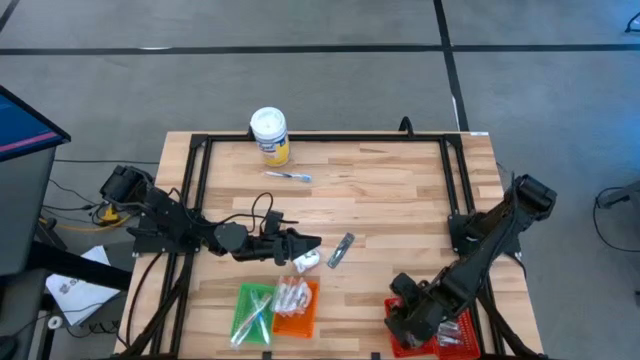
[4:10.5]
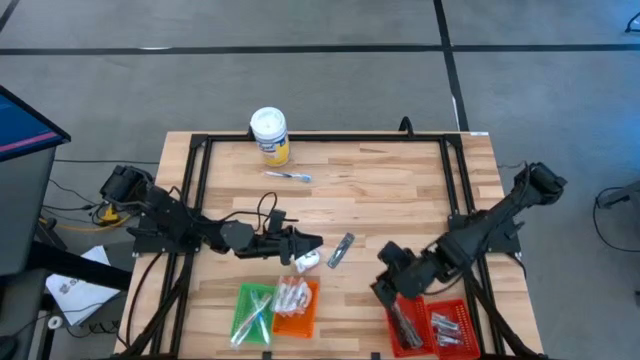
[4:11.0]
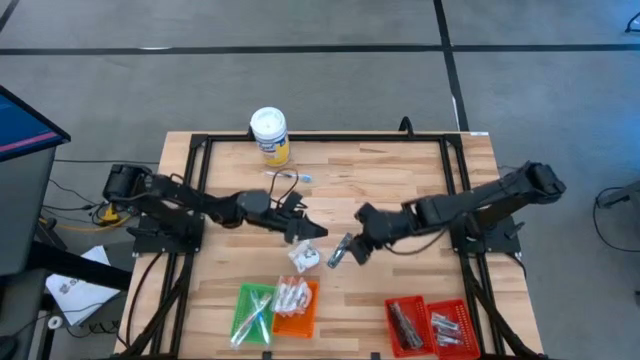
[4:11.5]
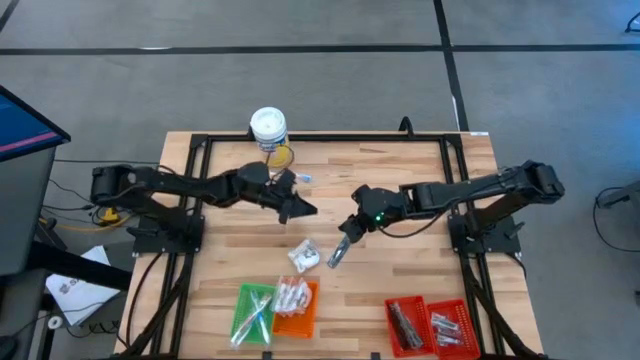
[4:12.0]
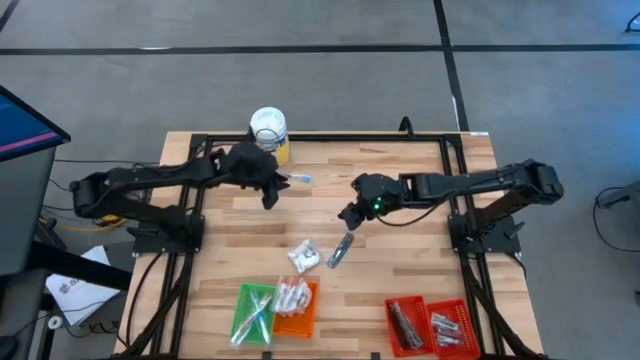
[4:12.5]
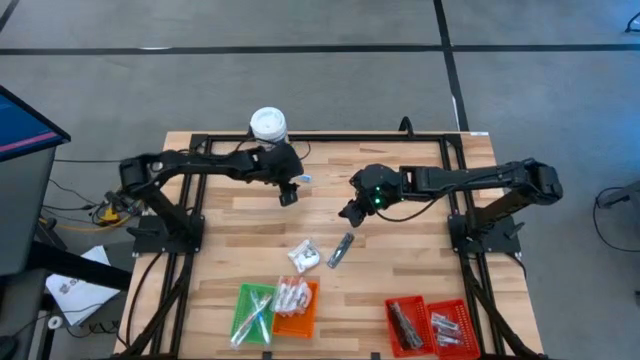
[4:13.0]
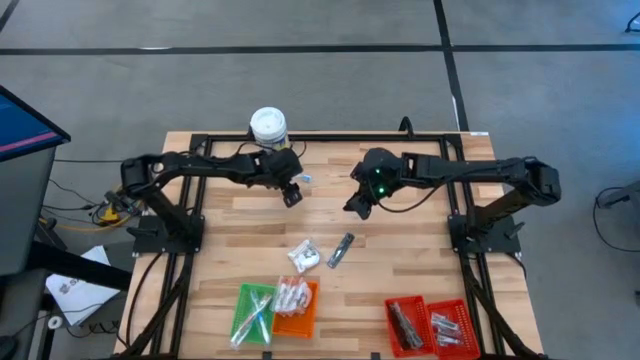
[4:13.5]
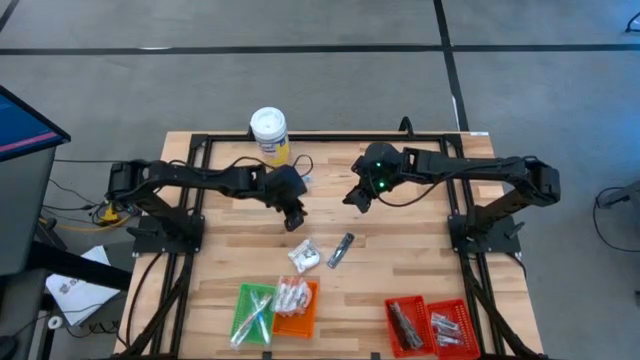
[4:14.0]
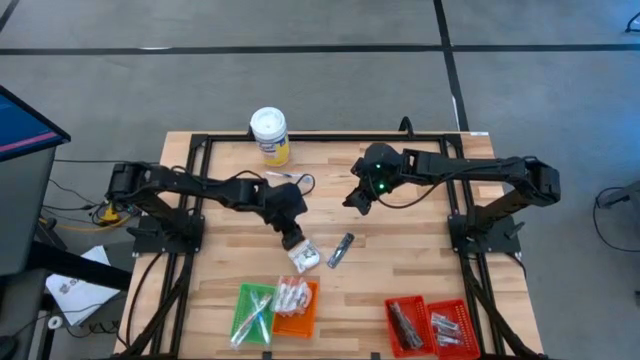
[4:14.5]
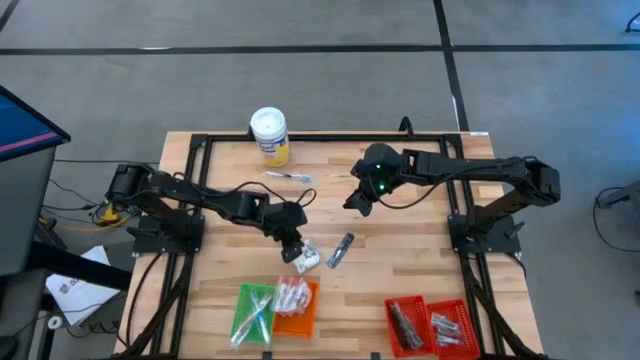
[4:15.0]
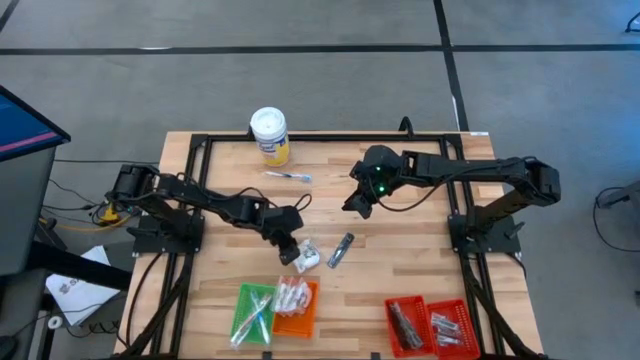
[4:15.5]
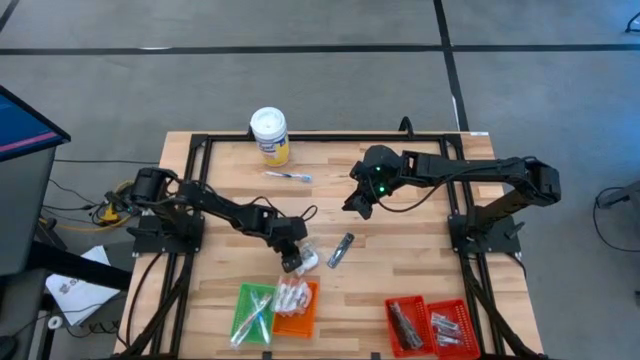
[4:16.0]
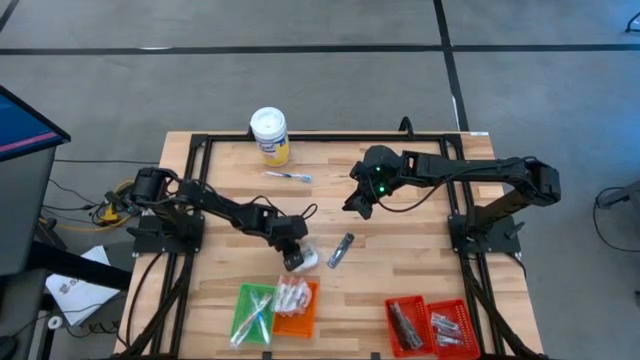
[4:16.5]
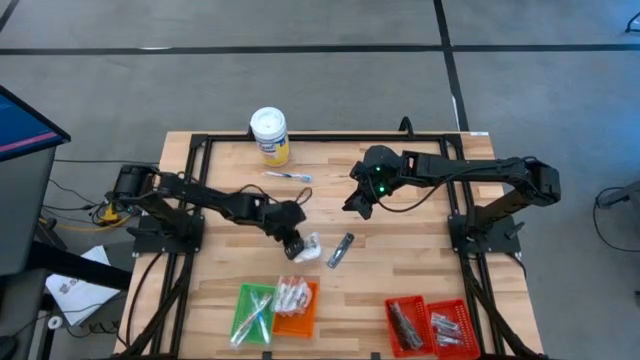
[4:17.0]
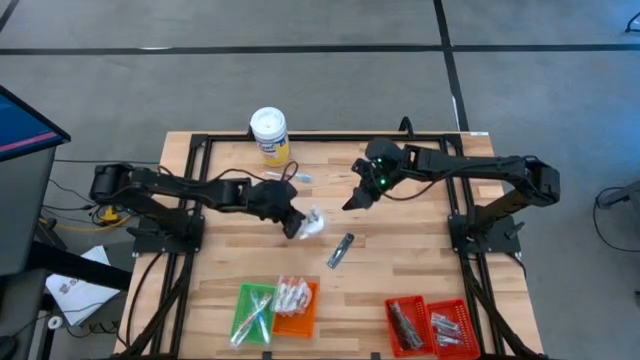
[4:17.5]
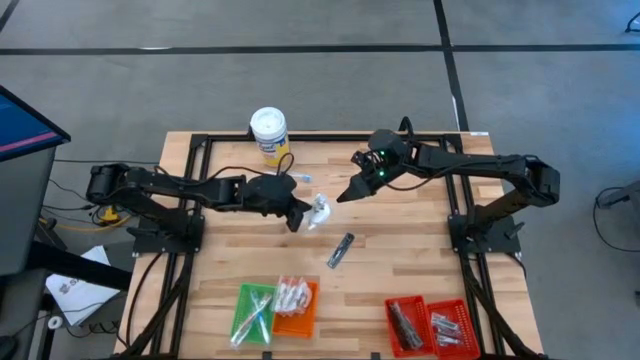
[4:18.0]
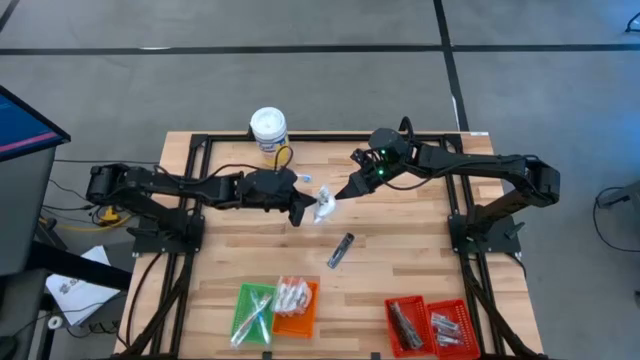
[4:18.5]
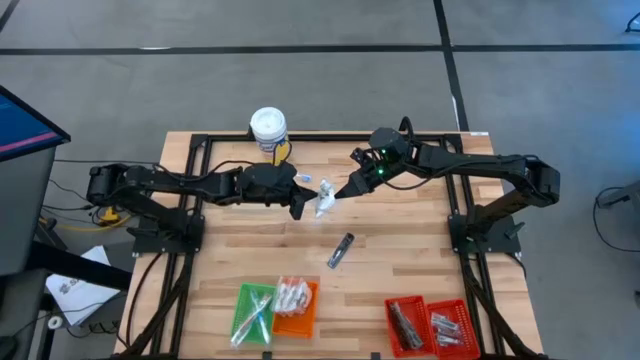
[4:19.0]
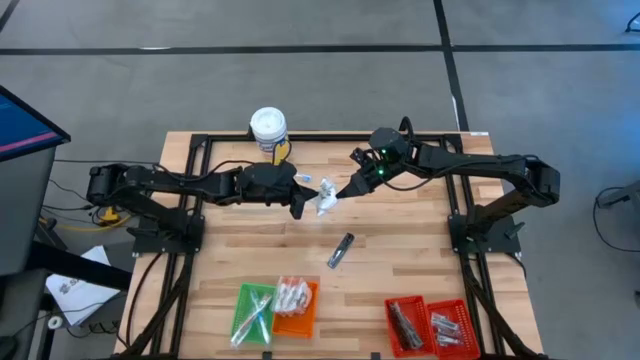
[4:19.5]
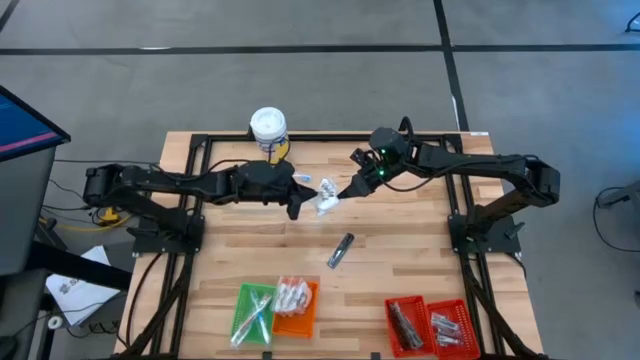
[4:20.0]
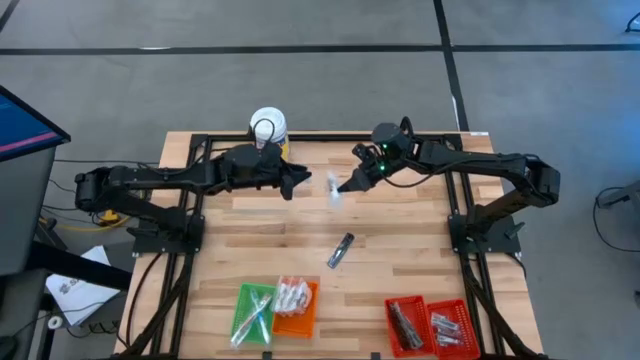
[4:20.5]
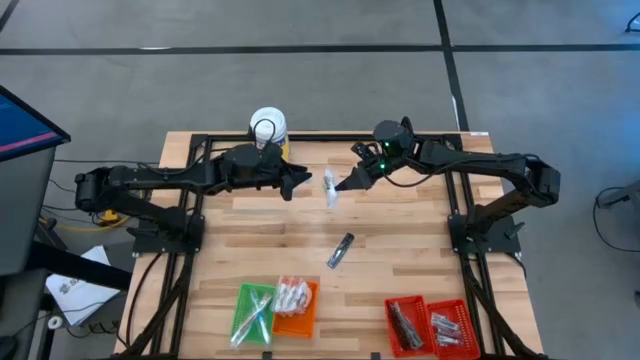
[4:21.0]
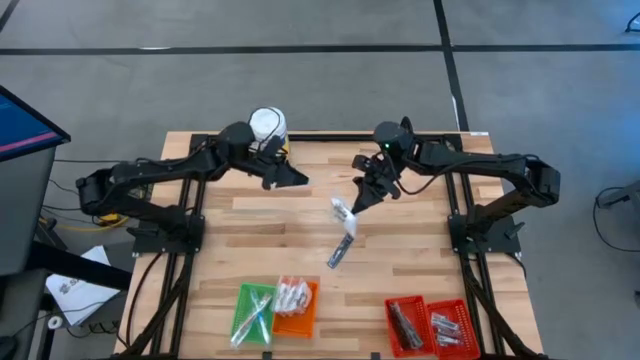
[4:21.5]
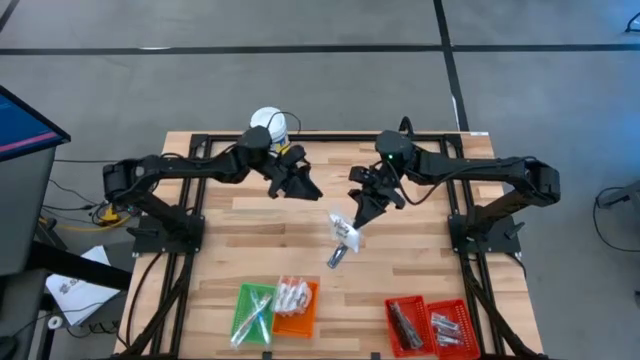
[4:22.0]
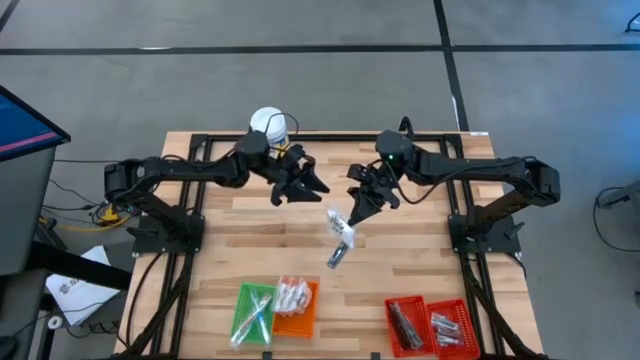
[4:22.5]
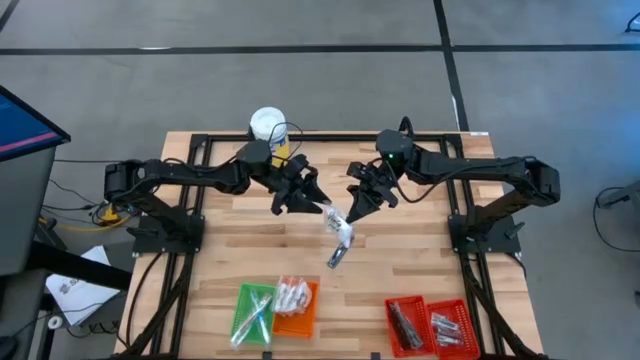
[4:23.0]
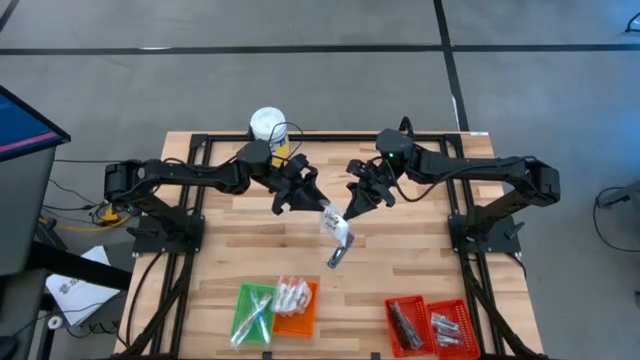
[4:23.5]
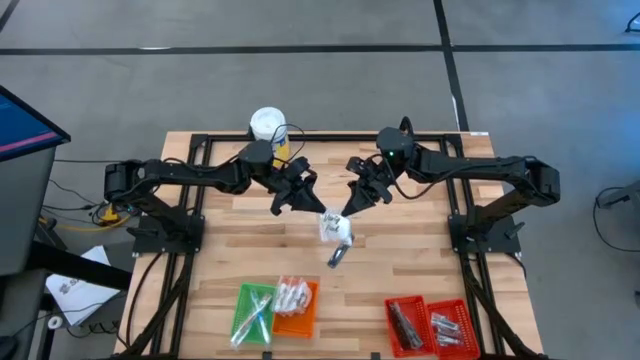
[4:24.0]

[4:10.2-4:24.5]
Task: Pick & Place Travel size toiletries
Put the white vanity pack into the orange basket

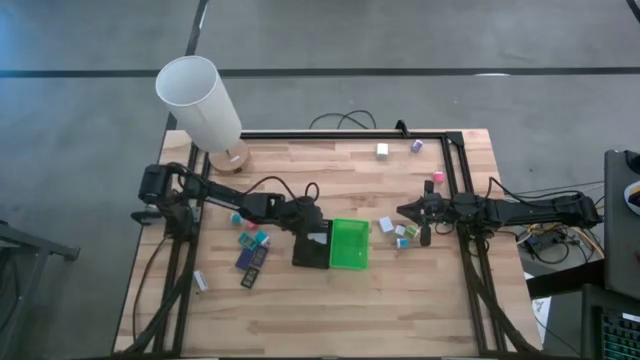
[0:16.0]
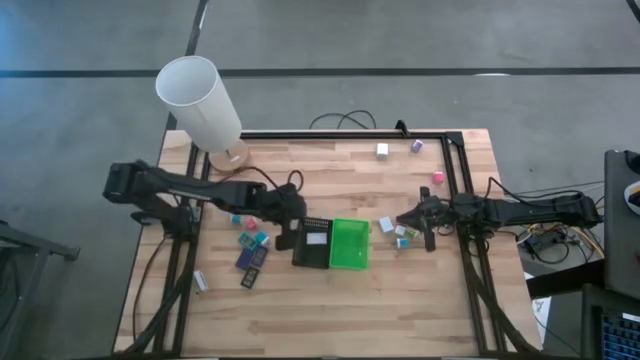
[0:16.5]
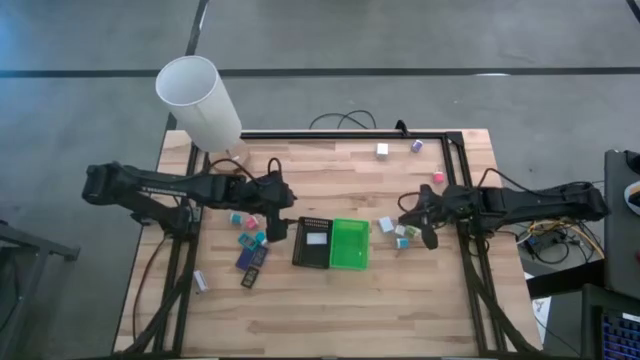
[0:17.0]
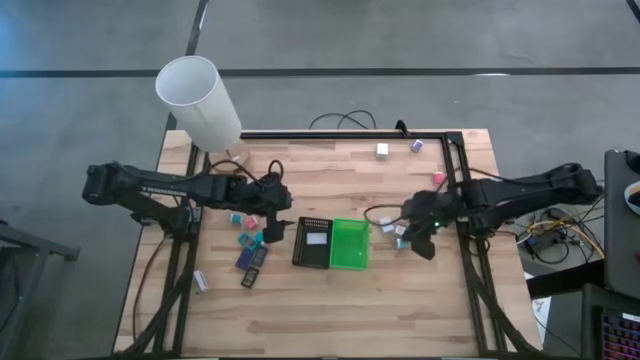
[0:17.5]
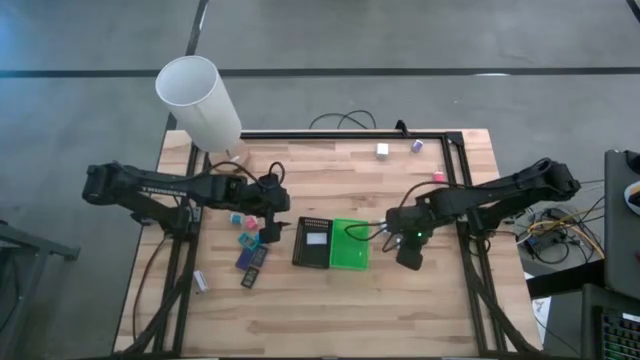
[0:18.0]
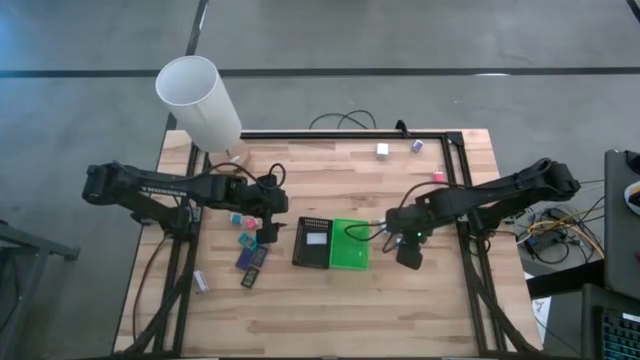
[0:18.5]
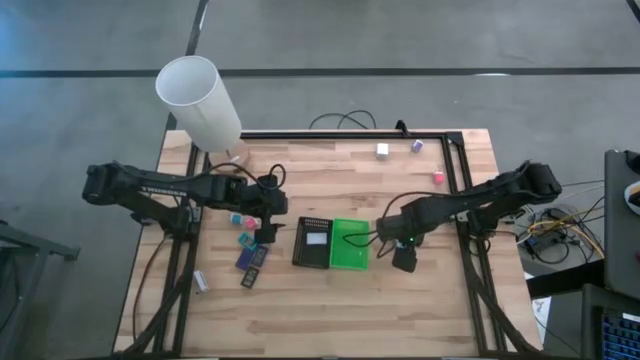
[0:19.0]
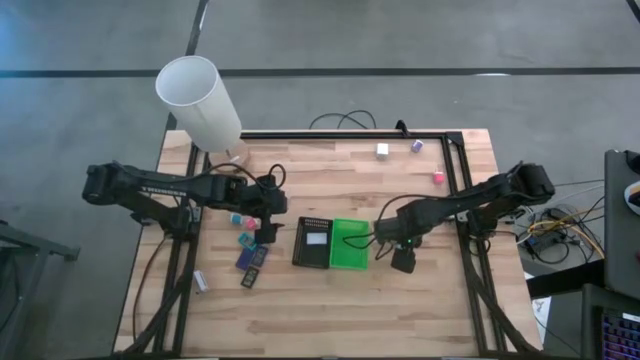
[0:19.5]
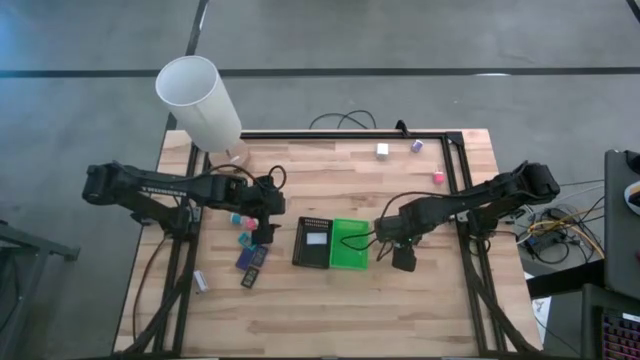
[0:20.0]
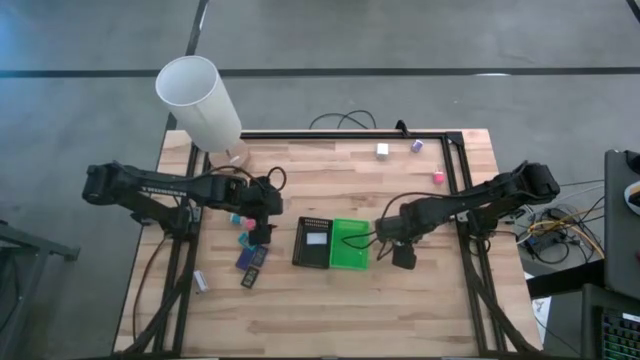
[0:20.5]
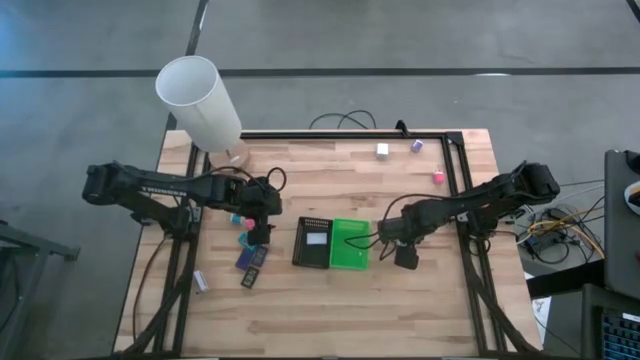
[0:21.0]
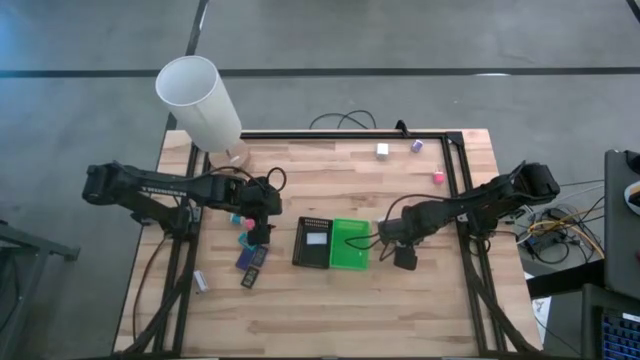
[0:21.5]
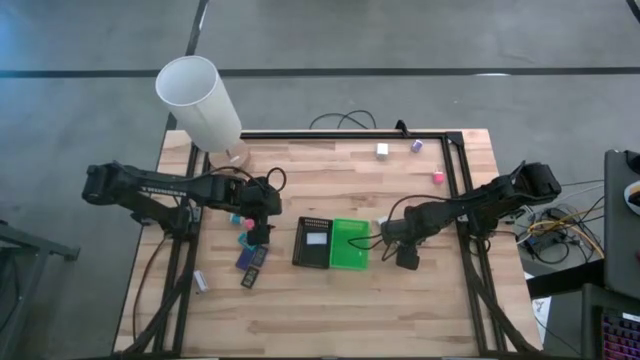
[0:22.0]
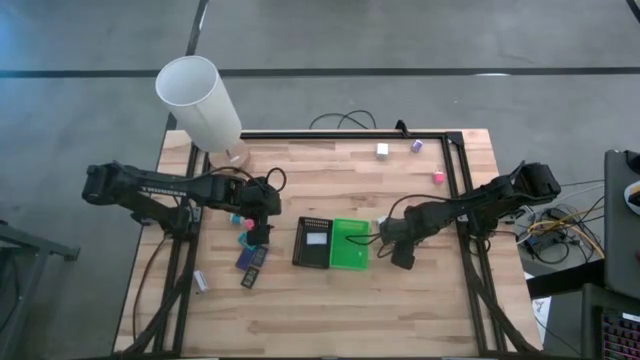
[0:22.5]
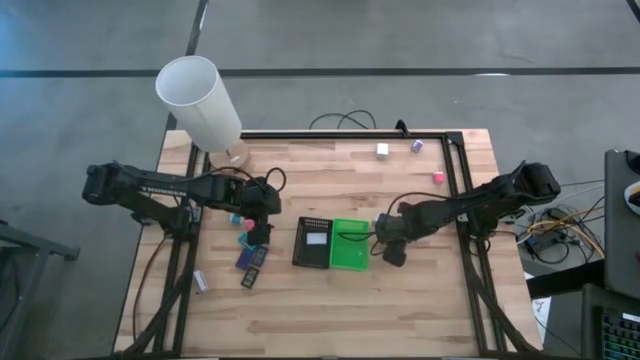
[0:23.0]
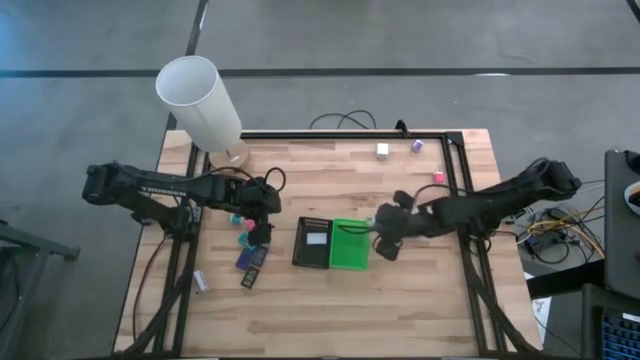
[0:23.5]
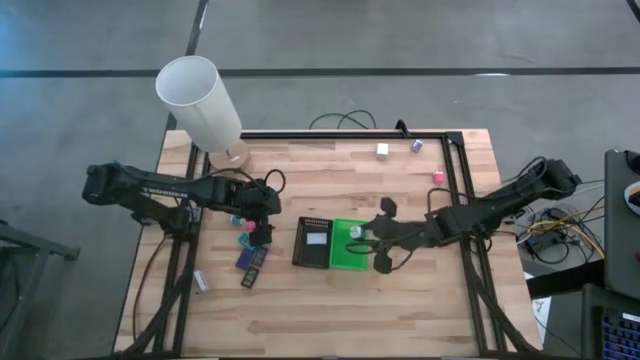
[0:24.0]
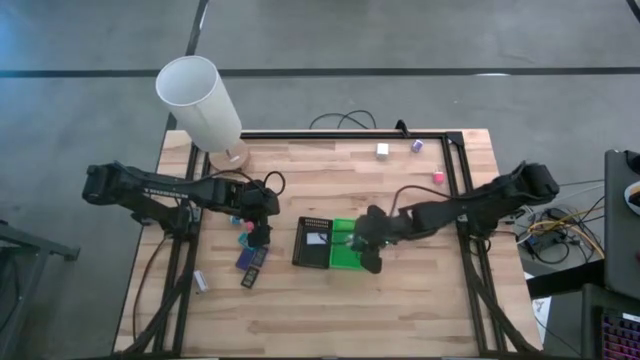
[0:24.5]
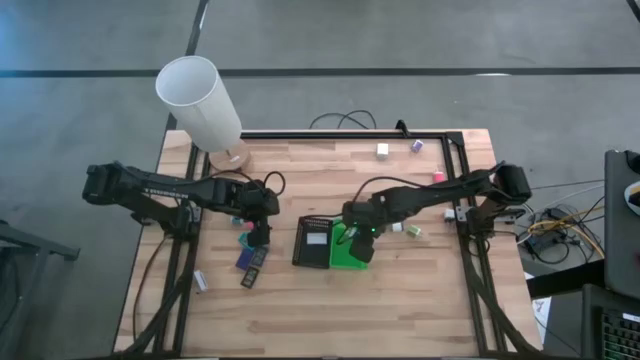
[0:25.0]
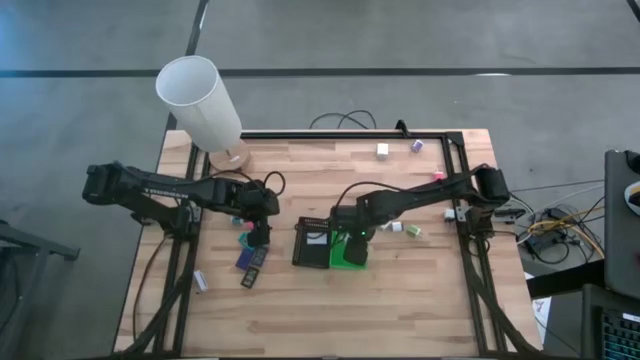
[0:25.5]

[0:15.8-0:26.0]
Task: Pick & Place Office items
Put the right blue charger adapter into the green basket
